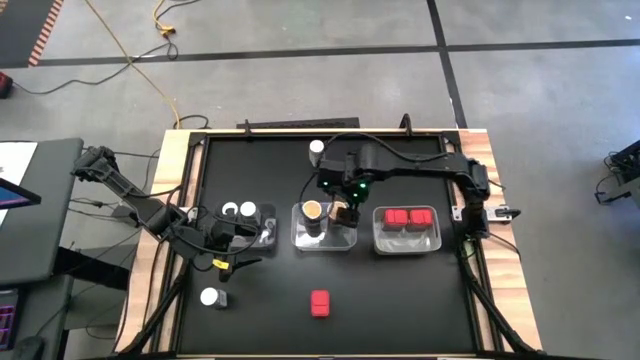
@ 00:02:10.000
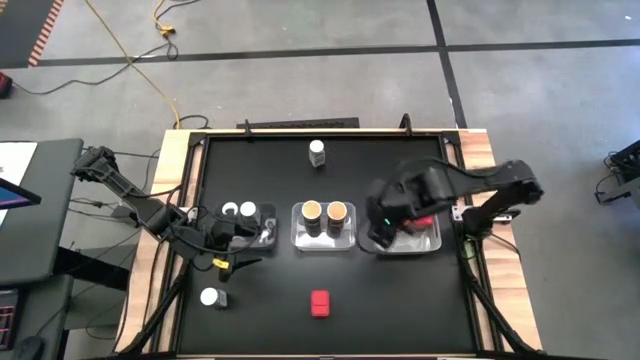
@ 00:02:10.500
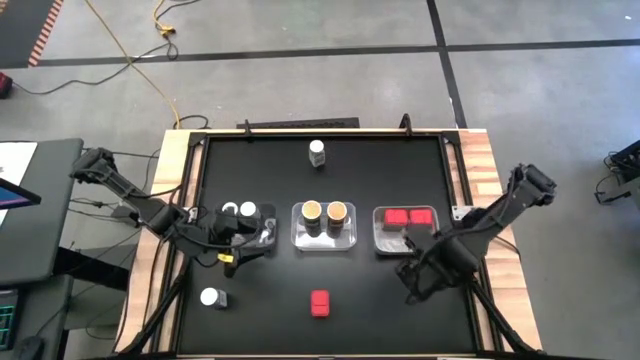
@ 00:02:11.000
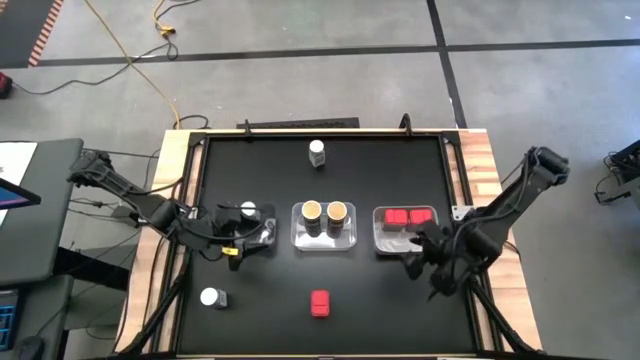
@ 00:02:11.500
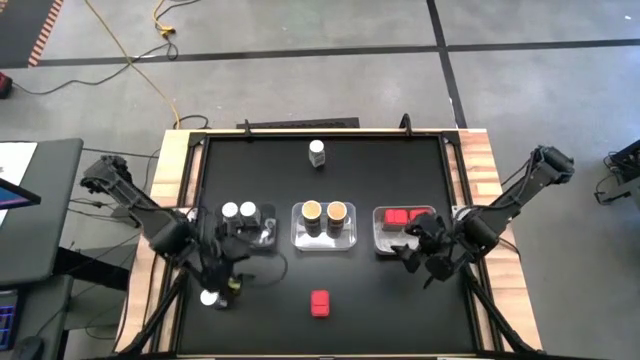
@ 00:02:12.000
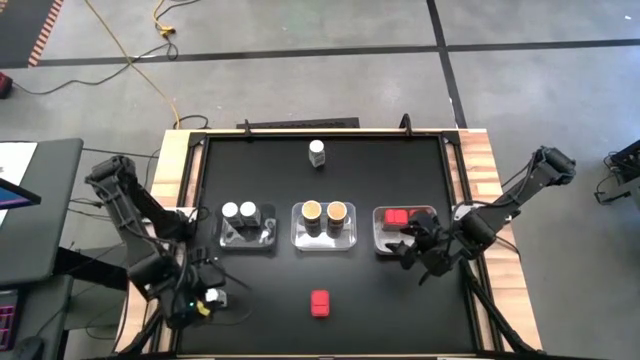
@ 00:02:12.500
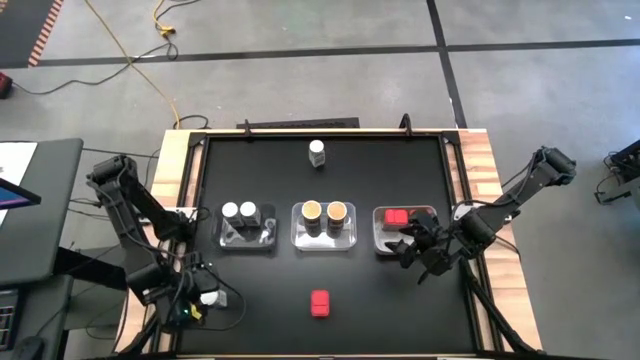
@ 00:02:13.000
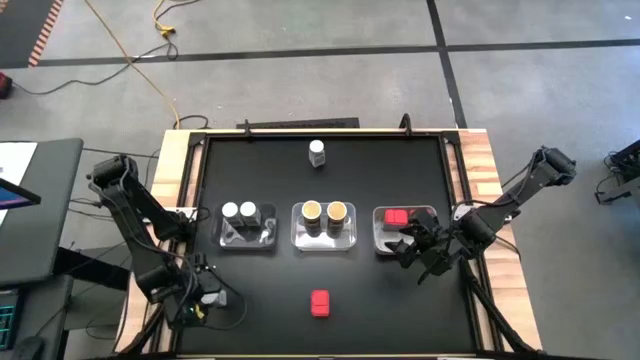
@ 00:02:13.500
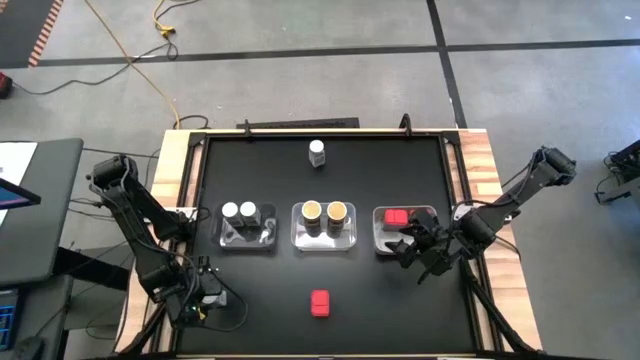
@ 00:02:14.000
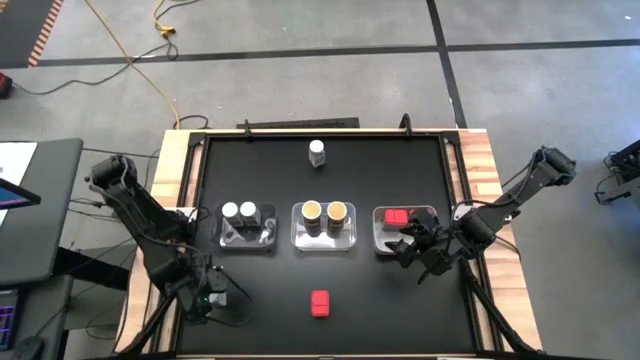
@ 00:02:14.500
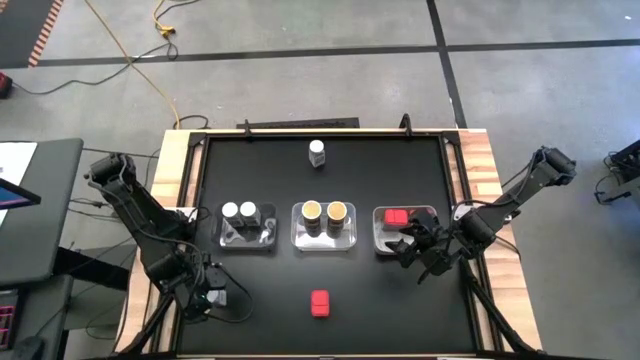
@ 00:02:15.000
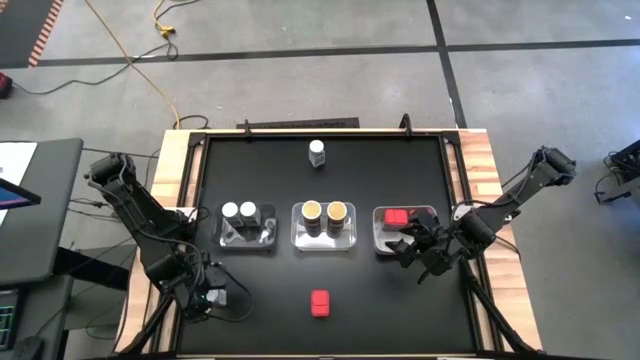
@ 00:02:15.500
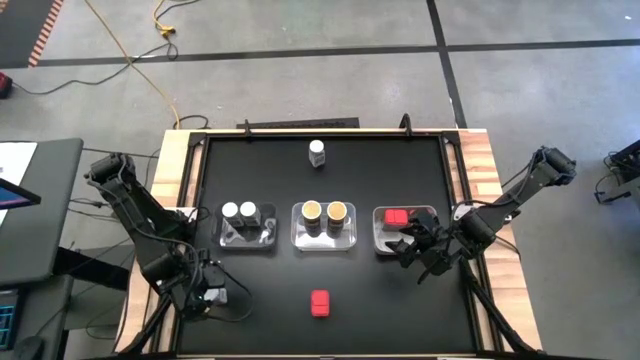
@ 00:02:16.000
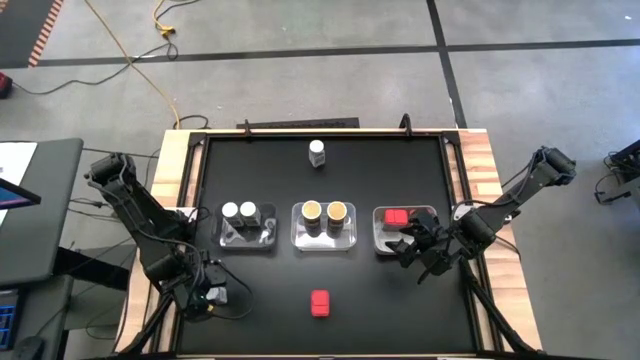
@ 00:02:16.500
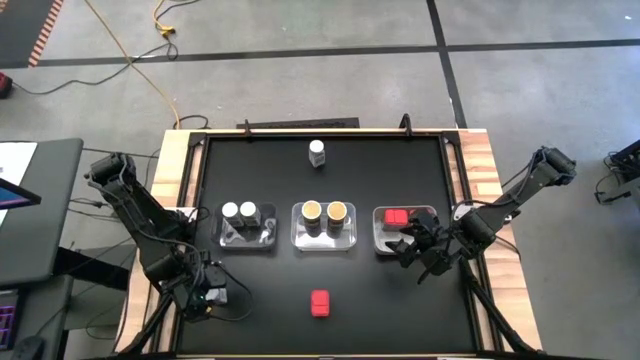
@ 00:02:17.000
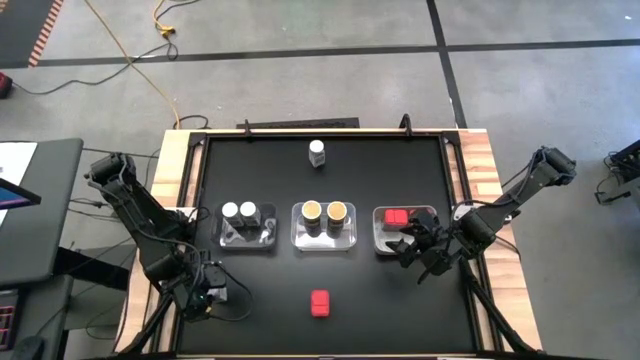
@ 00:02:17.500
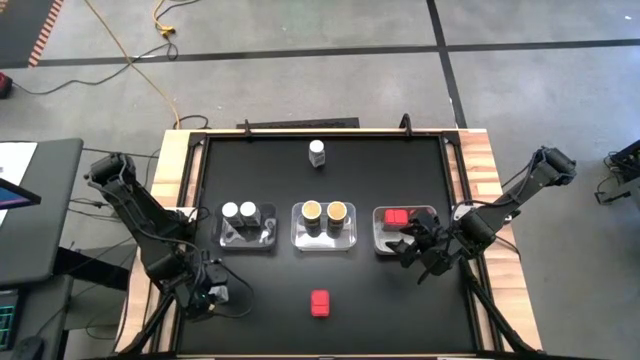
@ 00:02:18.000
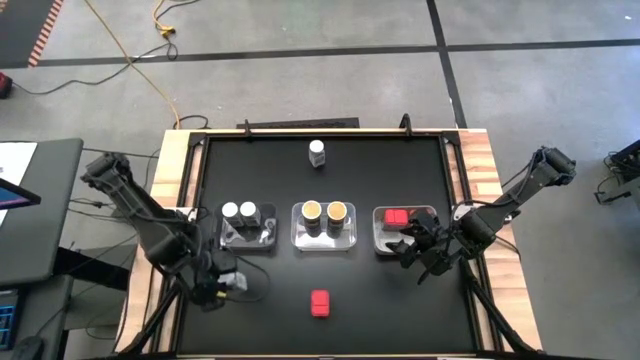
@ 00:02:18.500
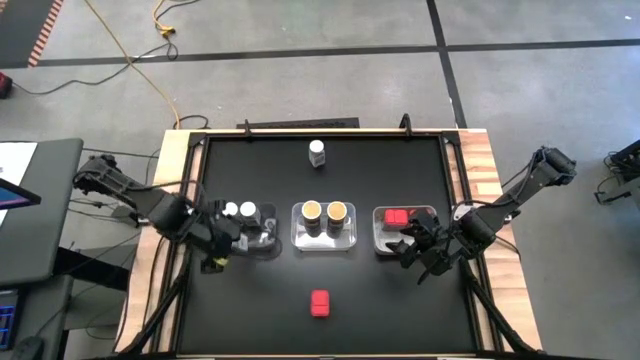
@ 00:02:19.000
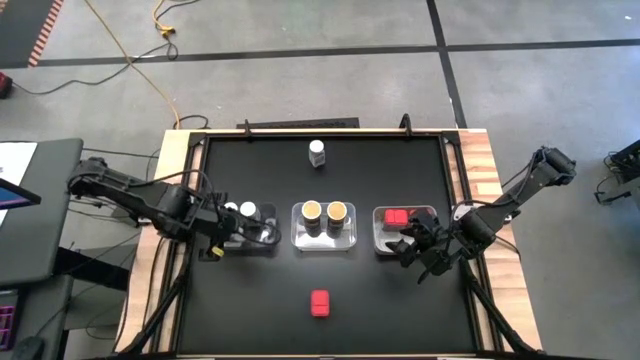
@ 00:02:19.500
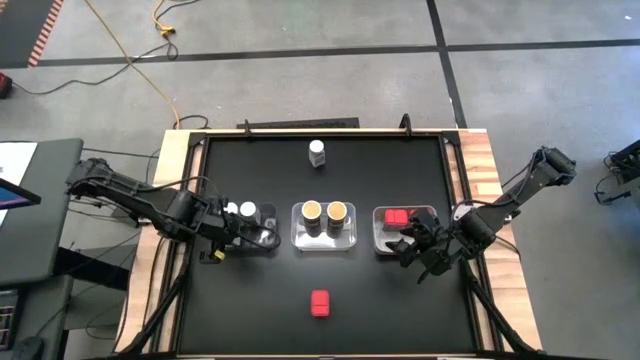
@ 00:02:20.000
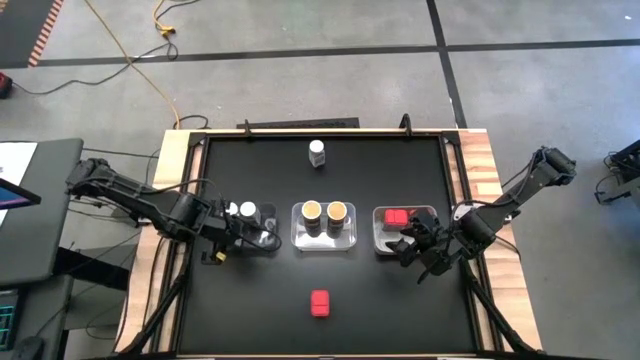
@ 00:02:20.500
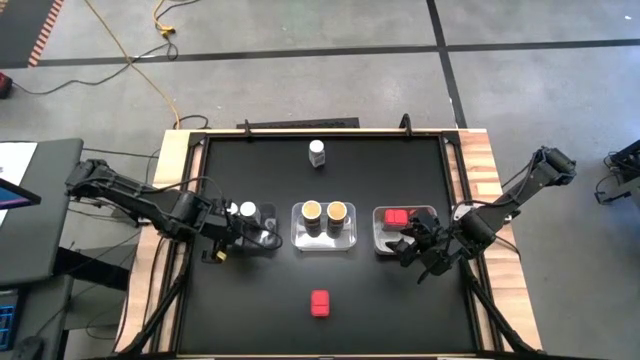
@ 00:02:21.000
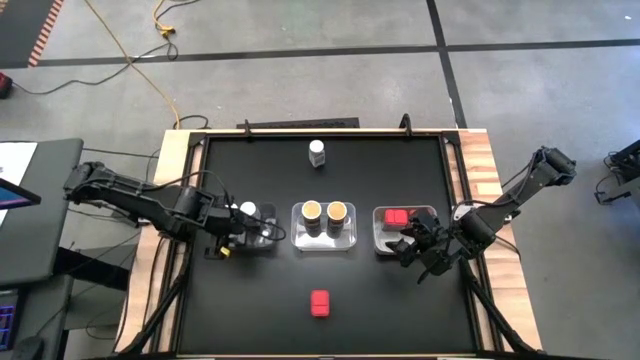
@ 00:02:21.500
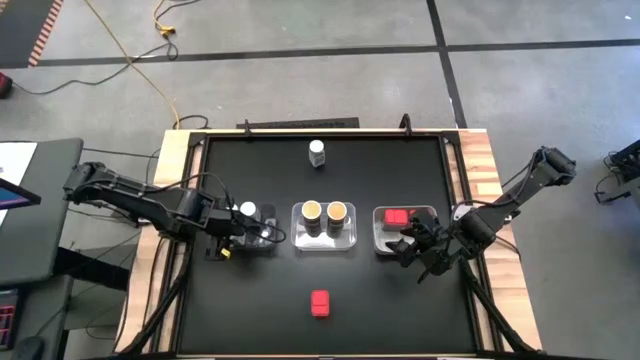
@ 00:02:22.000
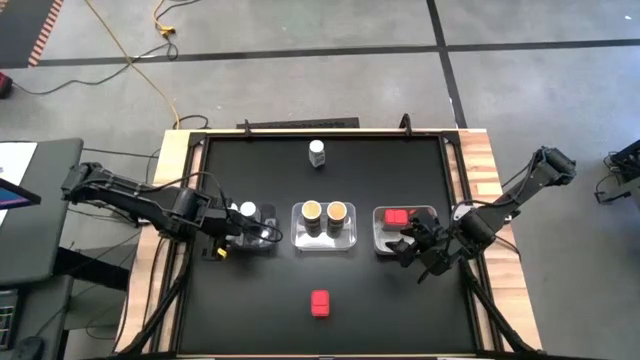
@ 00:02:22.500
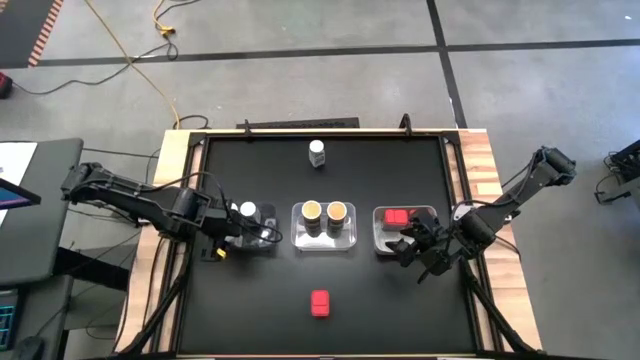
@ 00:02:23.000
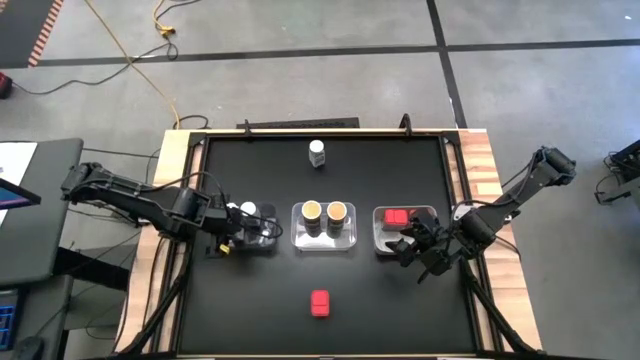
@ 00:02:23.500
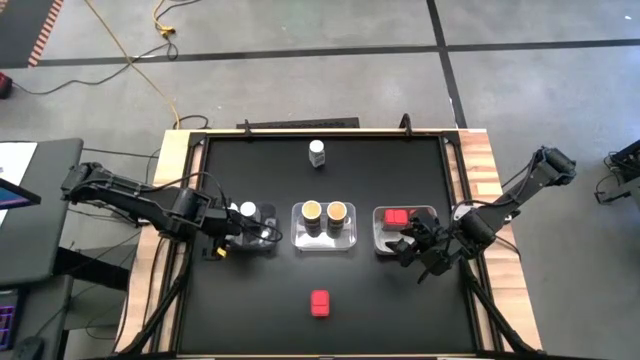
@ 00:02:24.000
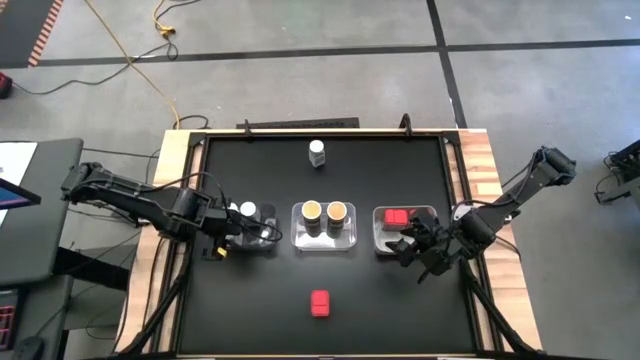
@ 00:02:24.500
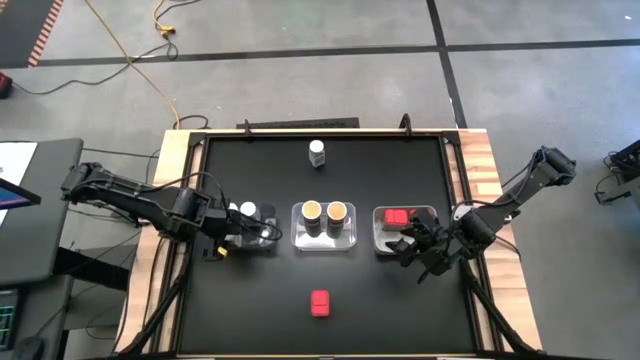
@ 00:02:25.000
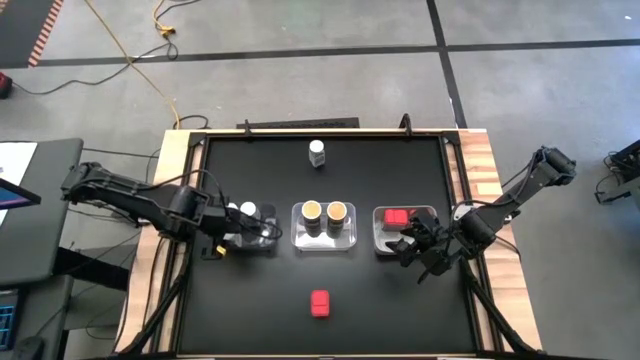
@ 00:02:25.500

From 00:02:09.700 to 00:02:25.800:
Task: Sort spices by type
Put the bottom white seasoning bottle into the black bin

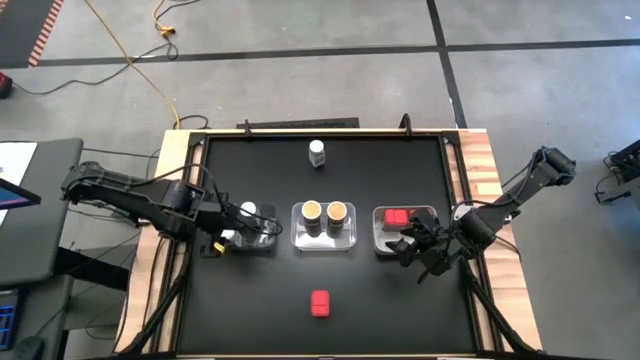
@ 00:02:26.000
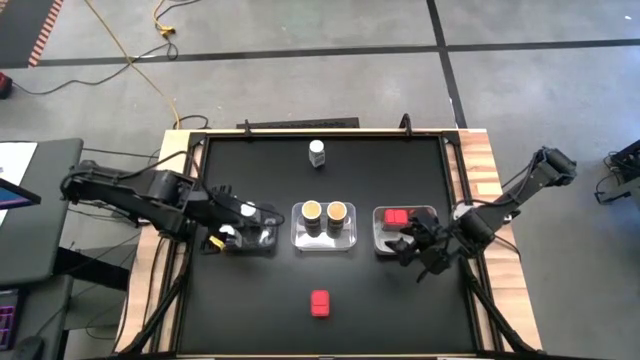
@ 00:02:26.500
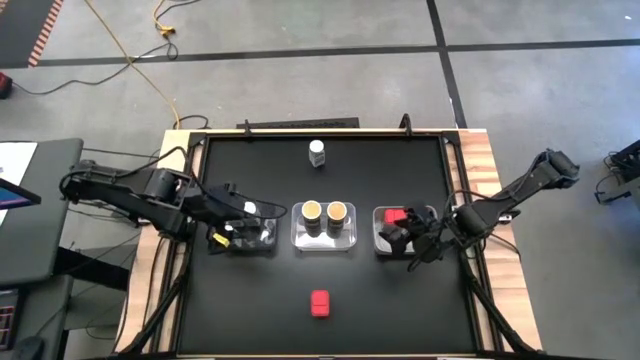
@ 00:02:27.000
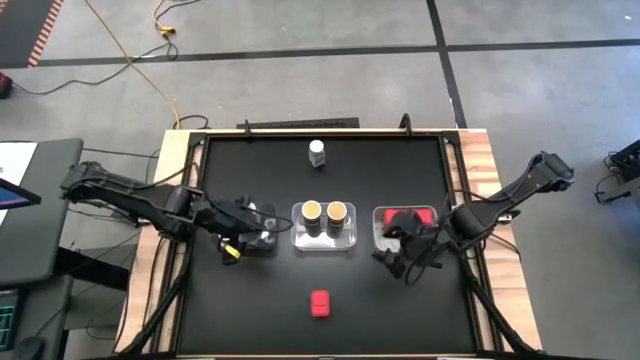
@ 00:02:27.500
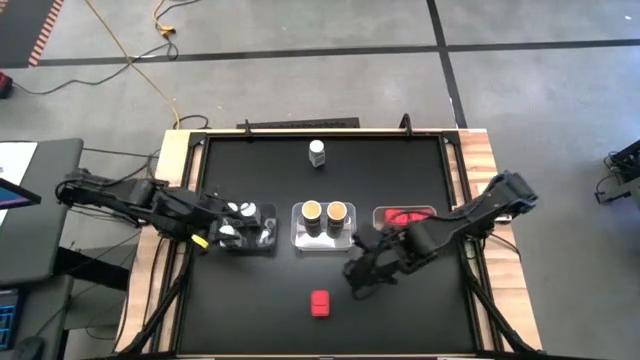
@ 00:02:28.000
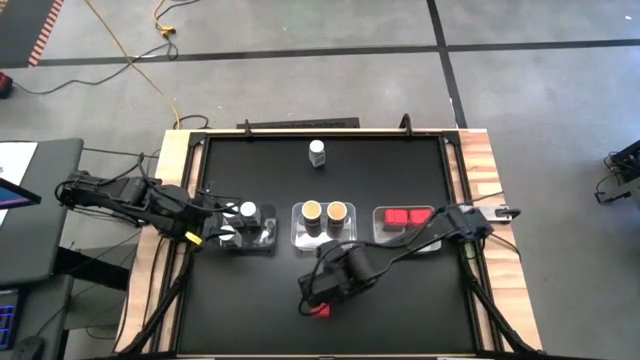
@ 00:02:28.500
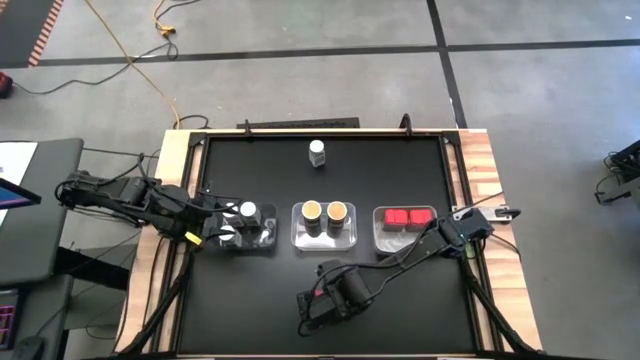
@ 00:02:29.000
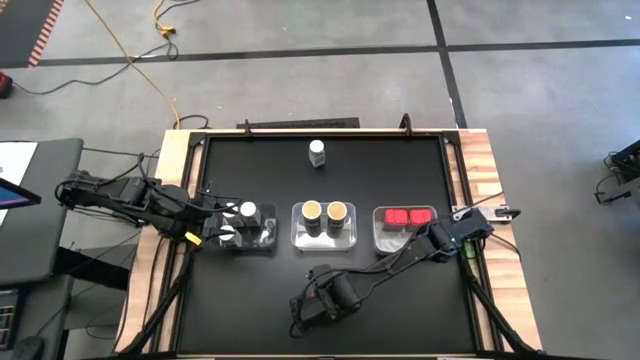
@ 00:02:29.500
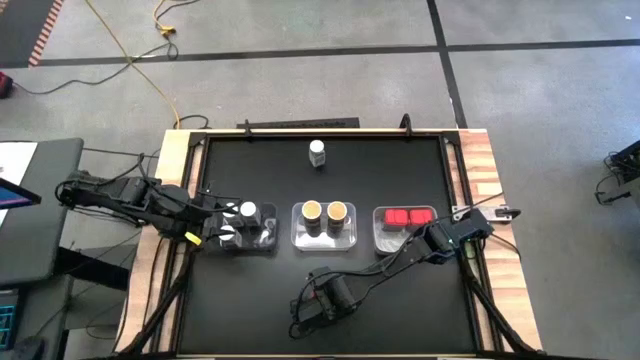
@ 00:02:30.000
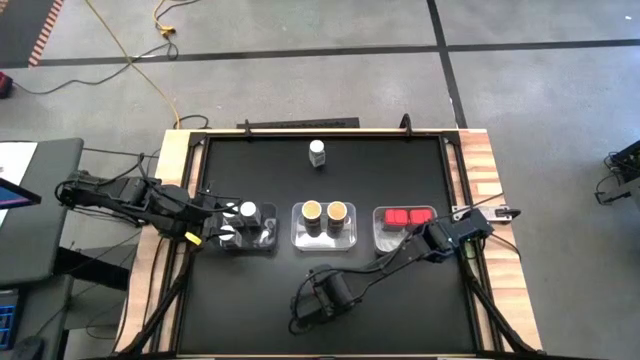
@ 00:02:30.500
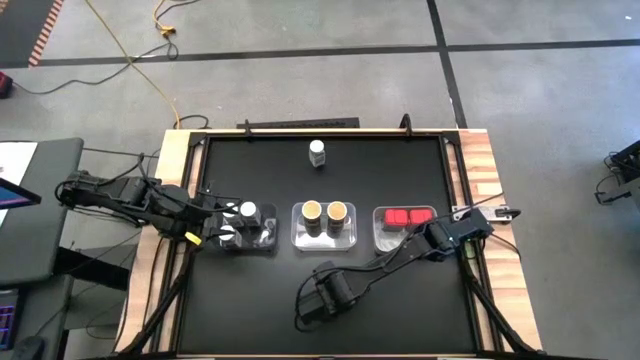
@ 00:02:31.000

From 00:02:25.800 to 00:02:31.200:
Put the red seasoning bottle into the gray bin
